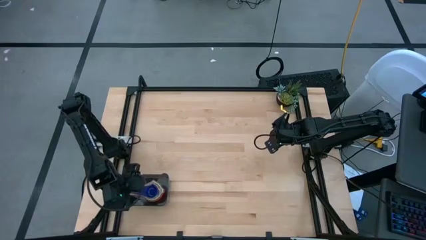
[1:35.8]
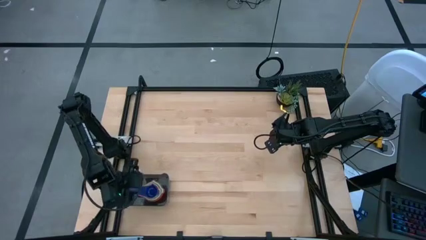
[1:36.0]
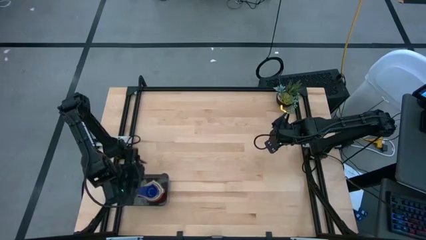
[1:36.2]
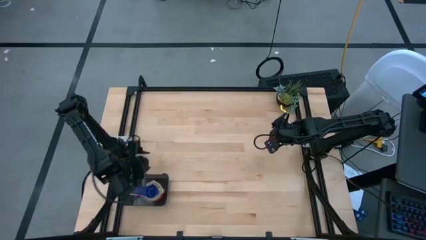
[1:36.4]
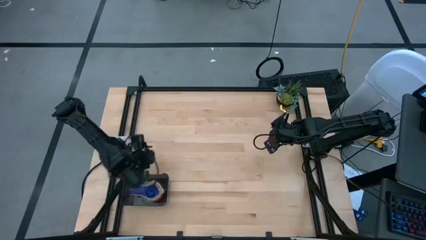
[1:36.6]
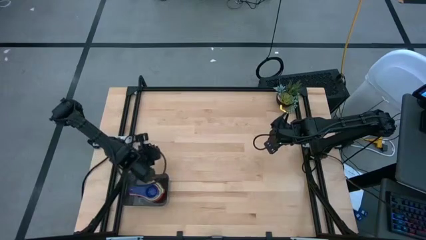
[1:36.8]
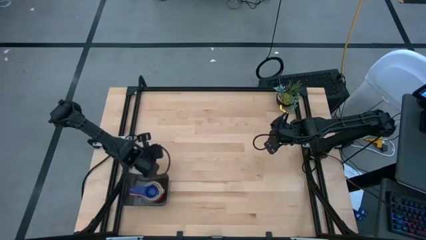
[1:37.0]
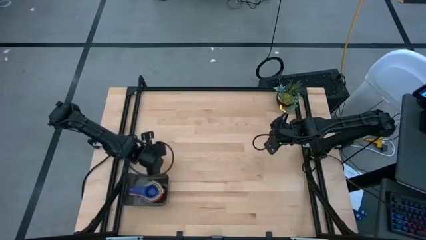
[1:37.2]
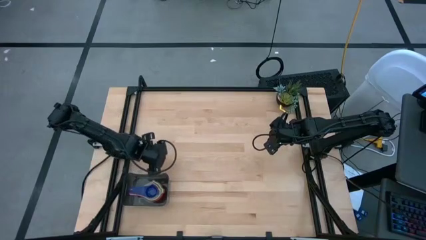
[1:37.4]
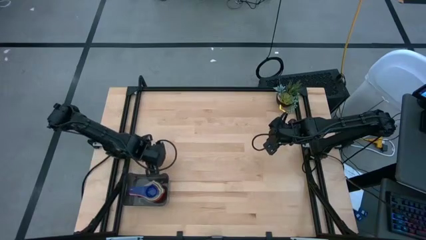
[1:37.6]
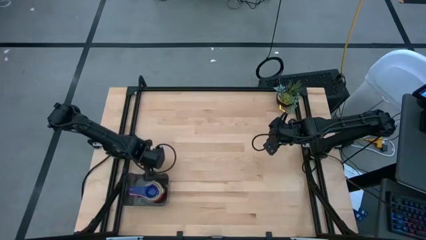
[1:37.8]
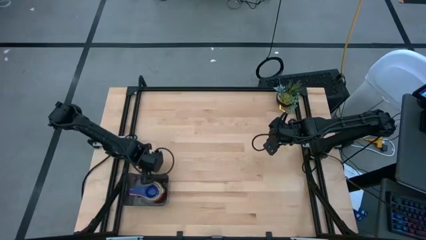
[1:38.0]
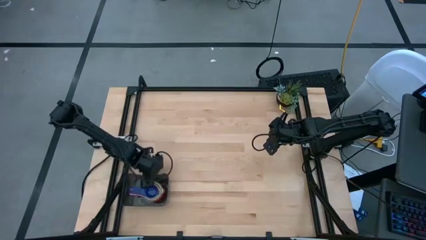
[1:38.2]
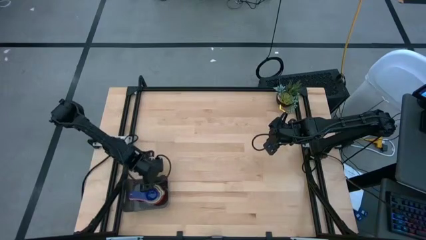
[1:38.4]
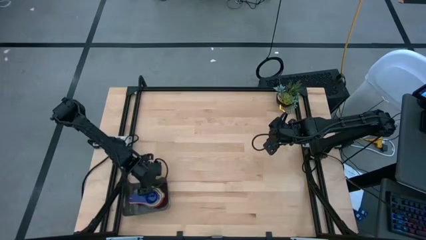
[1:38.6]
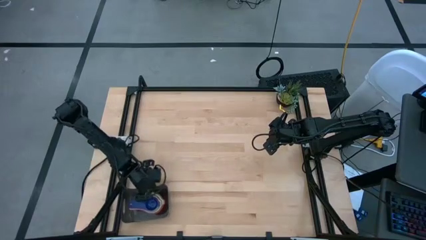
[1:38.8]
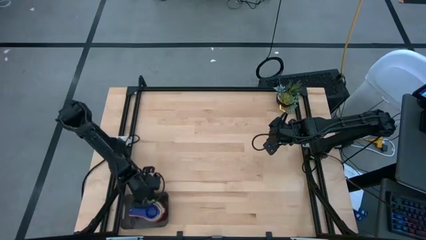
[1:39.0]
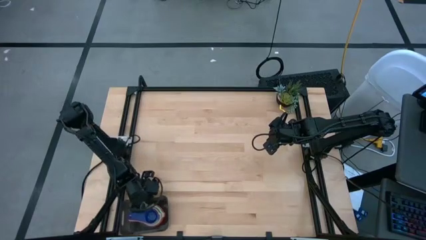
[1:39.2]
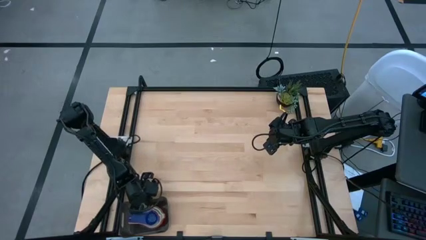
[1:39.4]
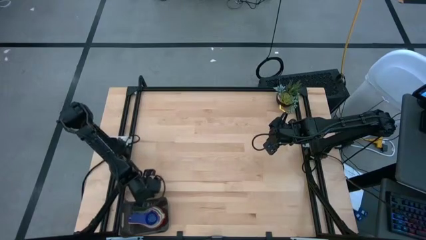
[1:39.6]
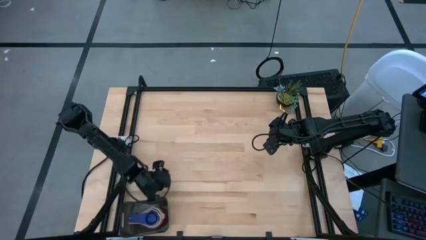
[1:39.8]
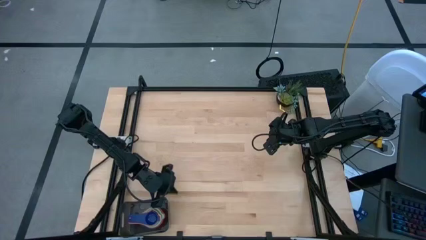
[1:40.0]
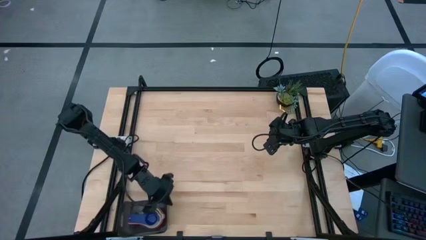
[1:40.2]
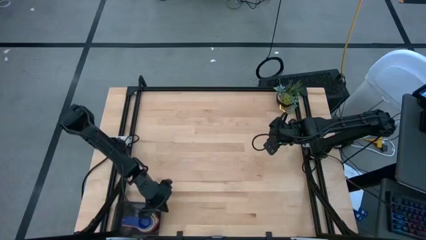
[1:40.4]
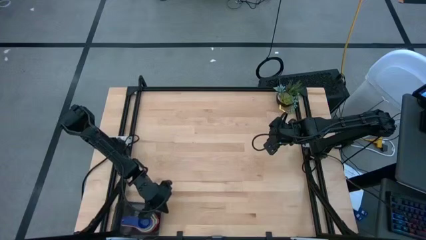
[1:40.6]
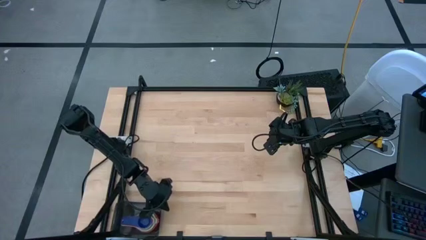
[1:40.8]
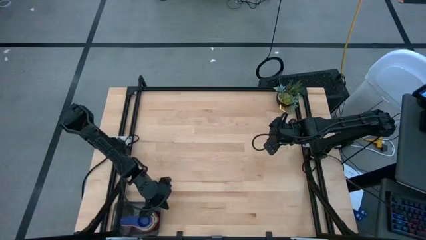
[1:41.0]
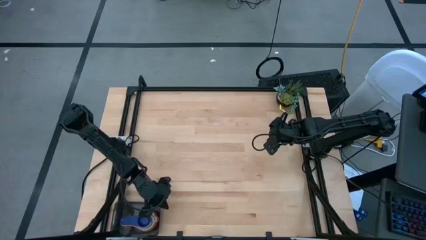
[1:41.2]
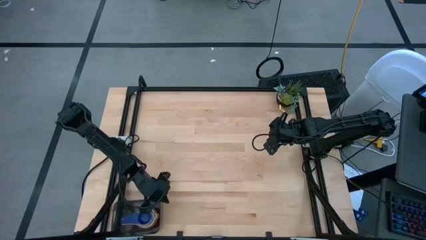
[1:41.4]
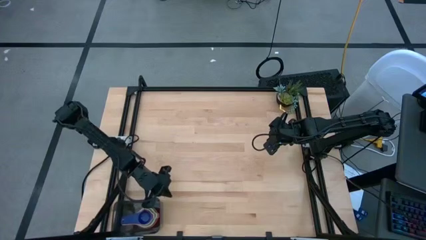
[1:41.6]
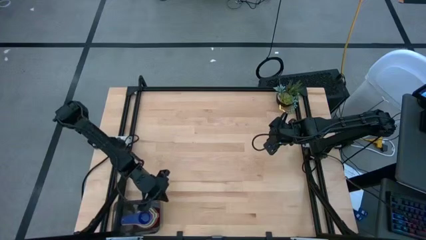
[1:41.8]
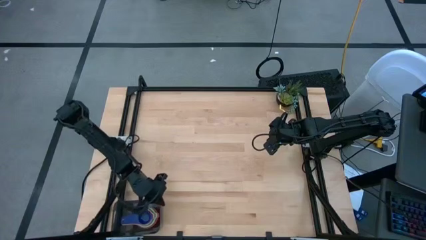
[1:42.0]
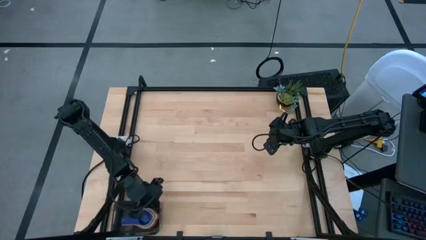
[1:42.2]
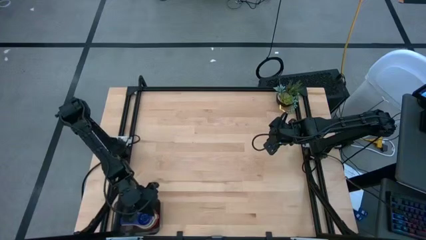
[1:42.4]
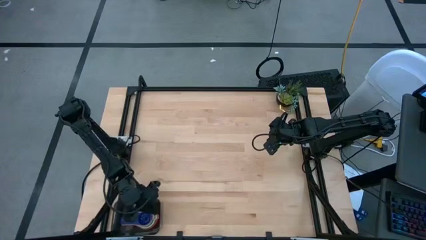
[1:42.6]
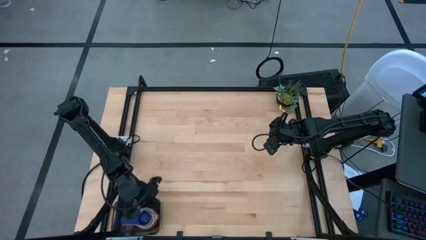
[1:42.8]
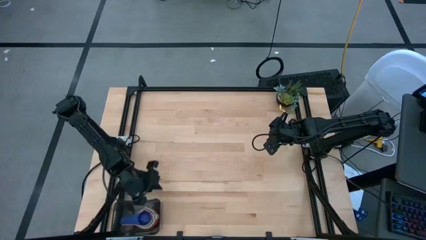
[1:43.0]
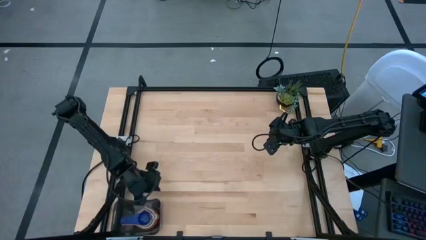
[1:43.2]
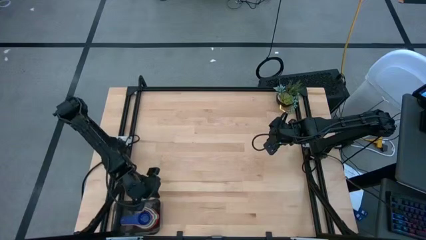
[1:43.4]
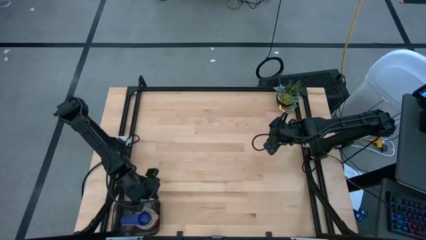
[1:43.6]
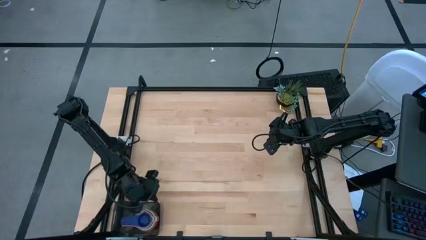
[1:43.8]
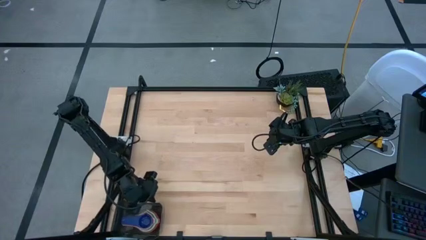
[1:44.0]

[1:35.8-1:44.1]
Task: Nest measuring cups in basket
Adjust the black bin

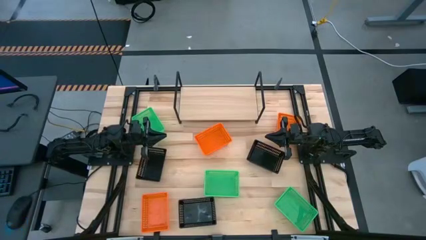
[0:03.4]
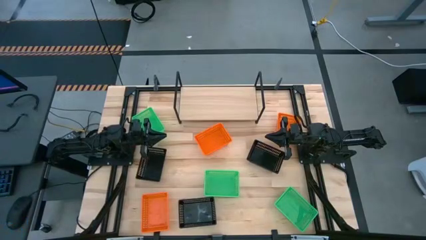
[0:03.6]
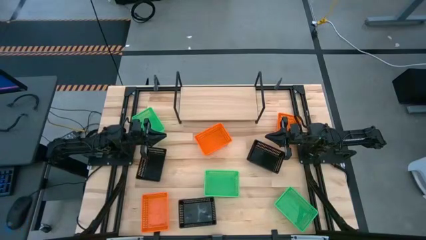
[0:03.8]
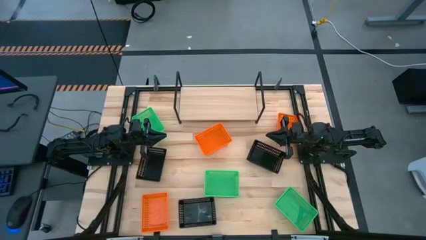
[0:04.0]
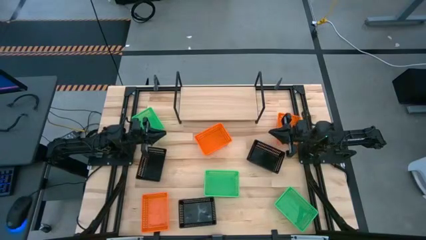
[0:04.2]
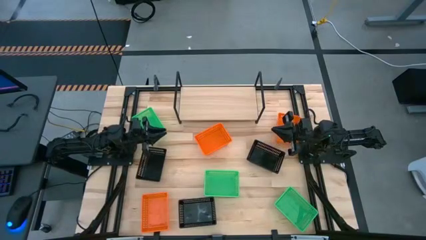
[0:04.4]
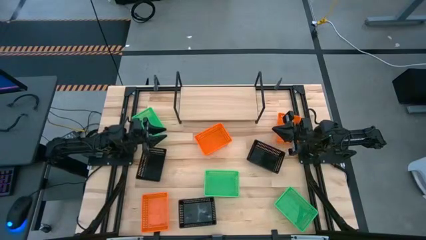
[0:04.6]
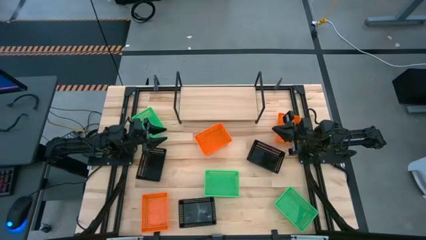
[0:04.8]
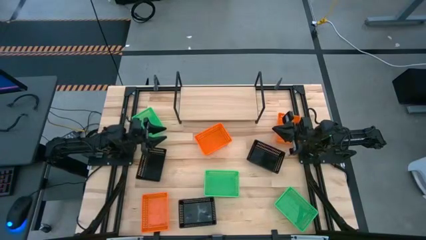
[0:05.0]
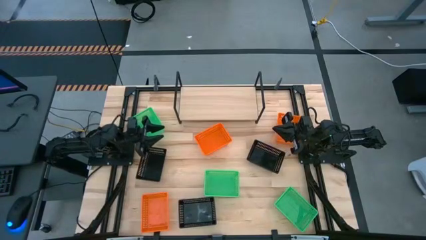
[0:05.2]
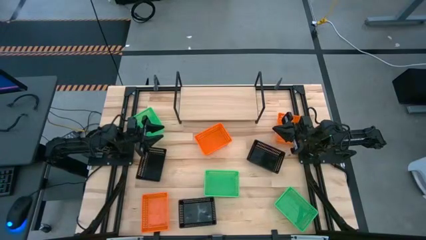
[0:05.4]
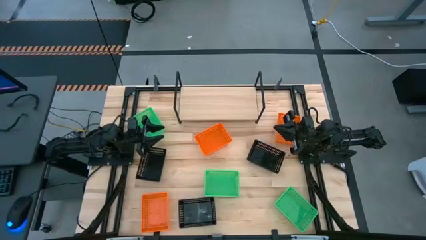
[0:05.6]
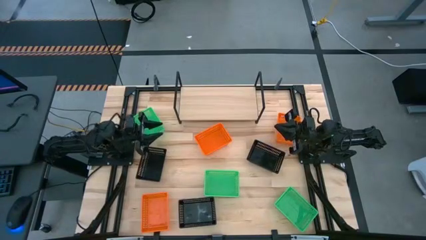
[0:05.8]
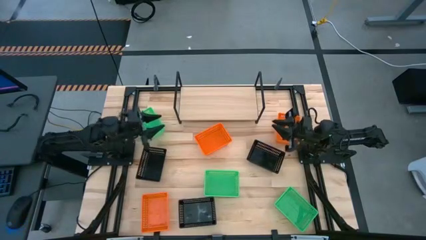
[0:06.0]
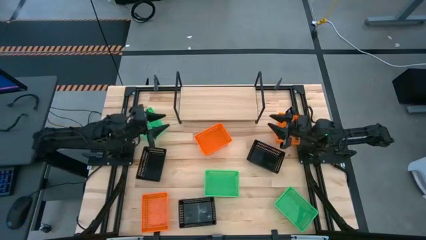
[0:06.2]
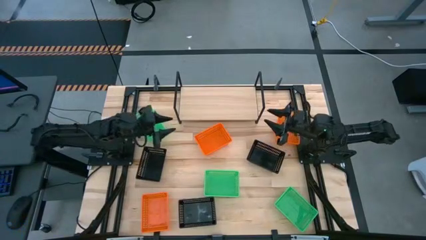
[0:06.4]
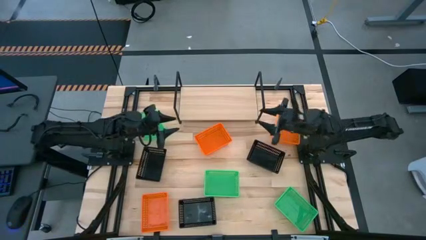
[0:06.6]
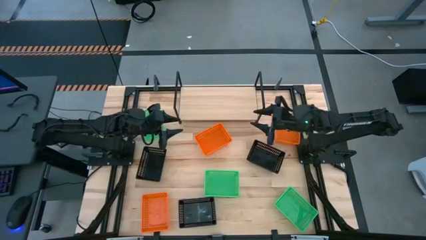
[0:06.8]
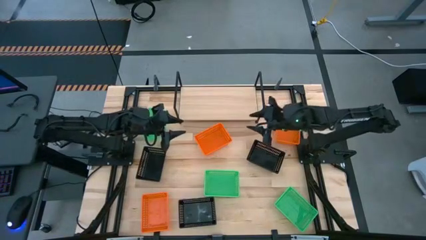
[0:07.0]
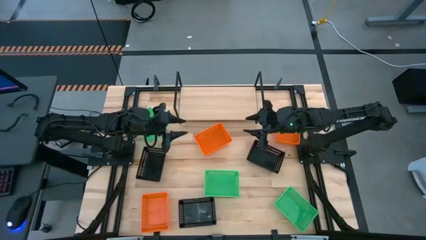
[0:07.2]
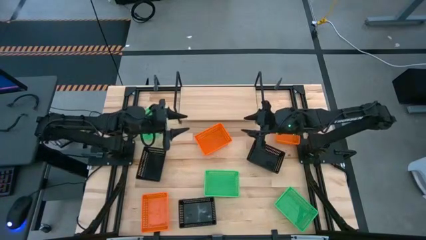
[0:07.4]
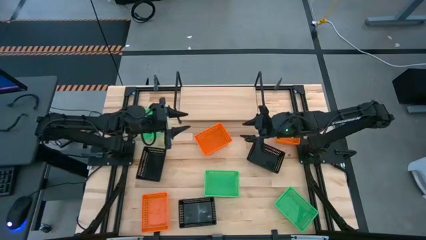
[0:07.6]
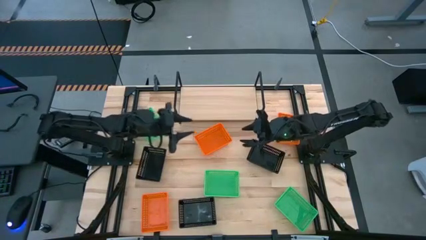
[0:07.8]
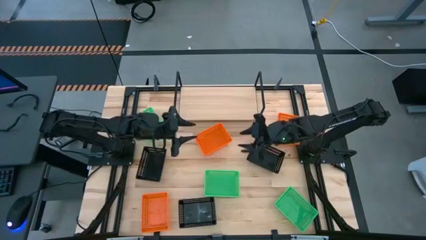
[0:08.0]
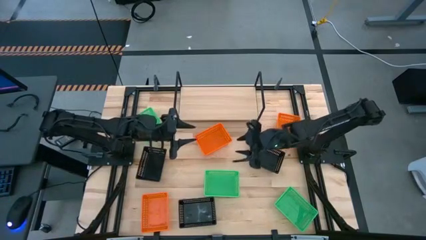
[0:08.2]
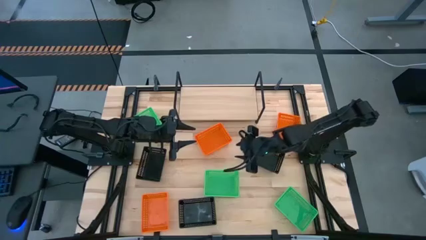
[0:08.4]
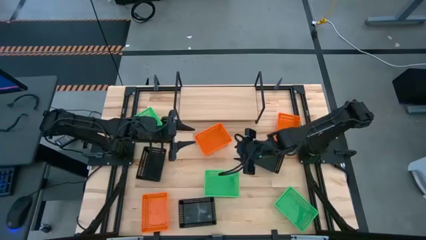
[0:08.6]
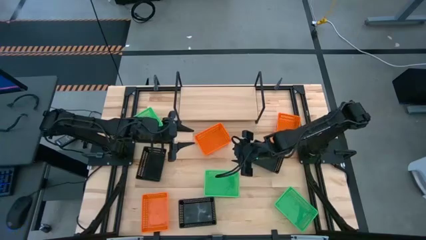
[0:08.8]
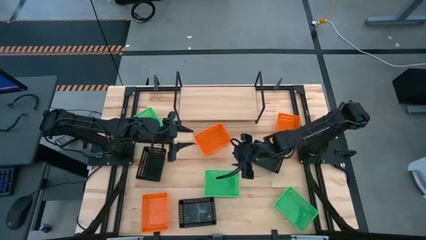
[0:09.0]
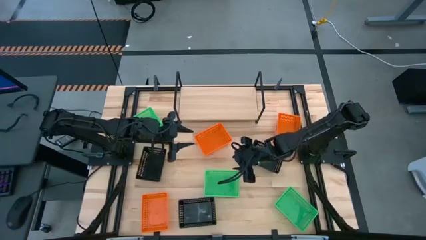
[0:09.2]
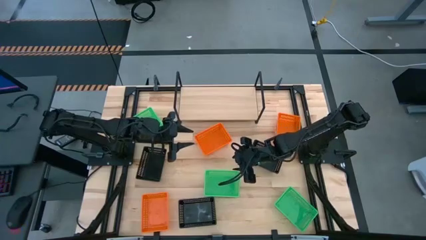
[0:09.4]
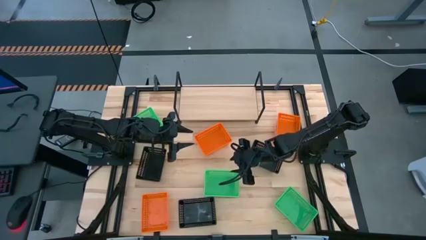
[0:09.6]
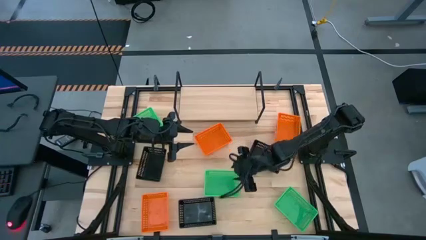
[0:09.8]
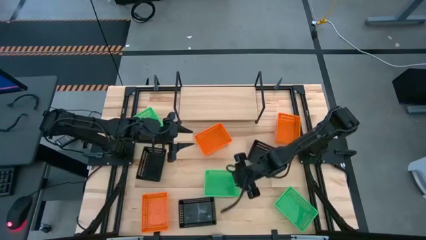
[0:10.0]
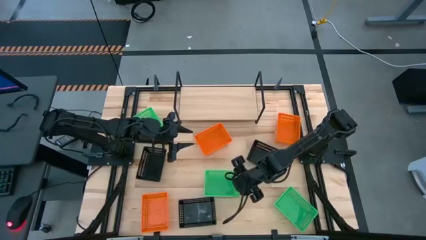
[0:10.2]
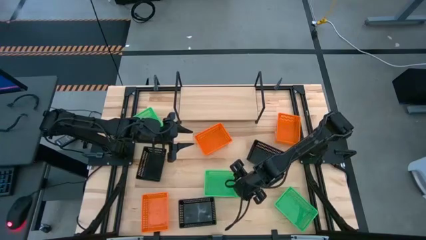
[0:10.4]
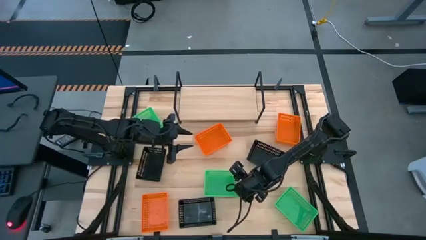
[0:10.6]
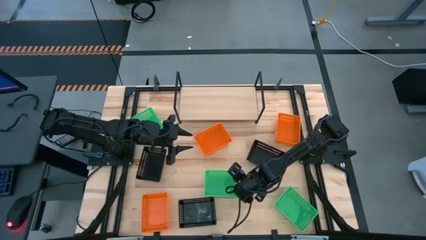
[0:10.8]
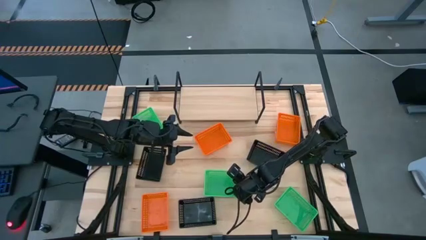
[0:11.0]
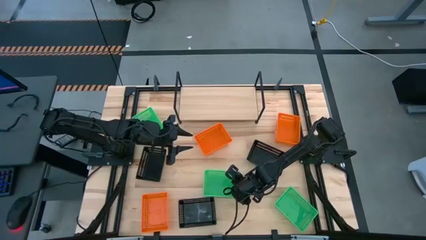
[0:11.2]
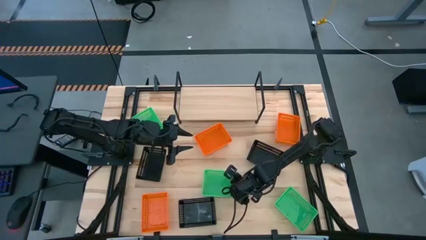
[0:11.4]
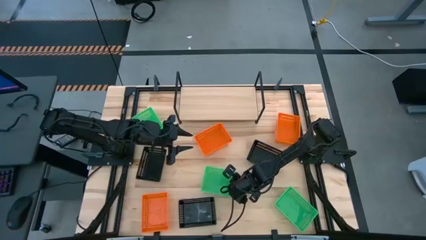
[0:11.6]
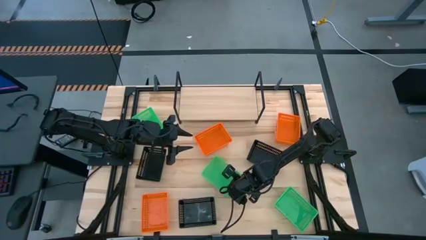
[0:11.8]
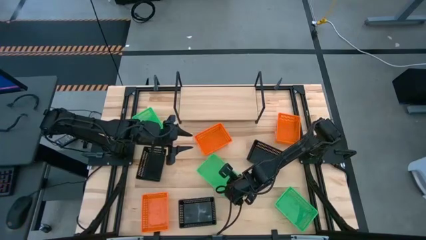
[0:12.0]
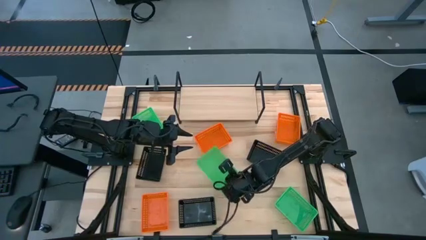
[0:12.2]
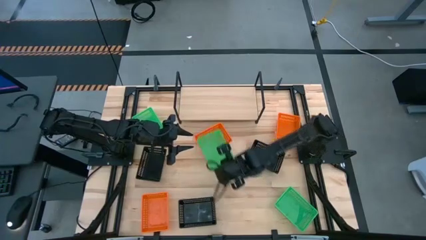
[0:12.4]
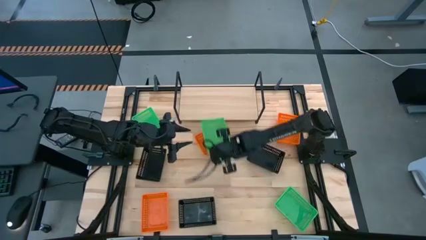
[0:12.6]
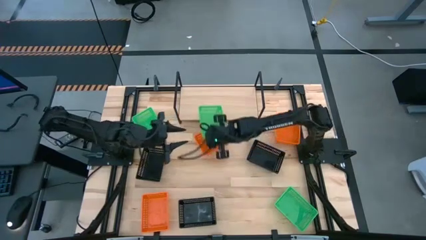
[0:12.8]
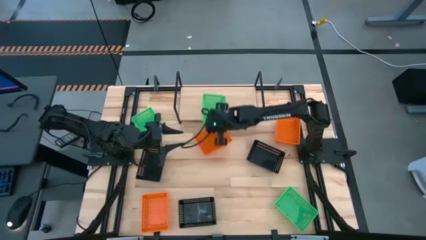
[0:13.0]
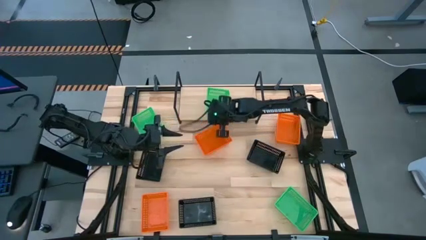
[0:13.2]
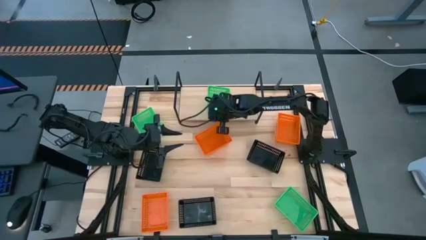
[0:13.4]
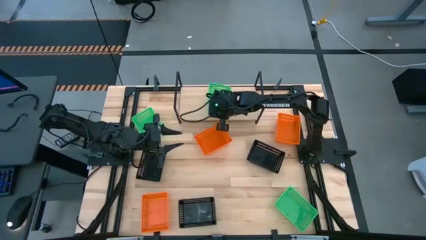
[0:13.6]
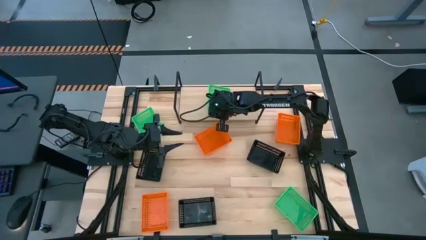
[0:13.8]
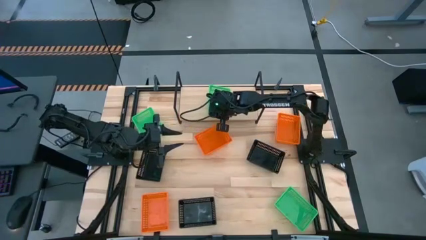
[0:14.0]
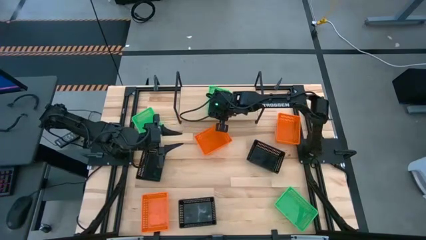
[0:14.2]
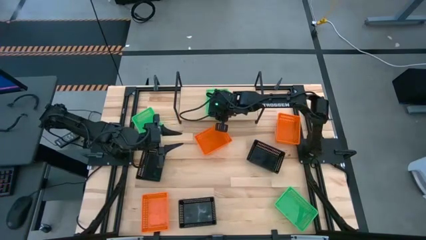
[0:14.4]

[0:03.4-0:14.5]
Task: Stack baskets on shelf by color
Put the middle green bin on the shelf
